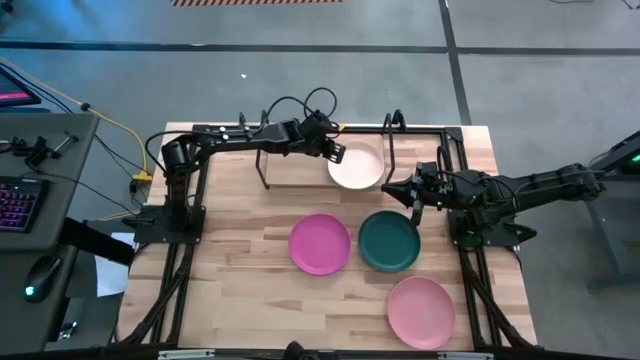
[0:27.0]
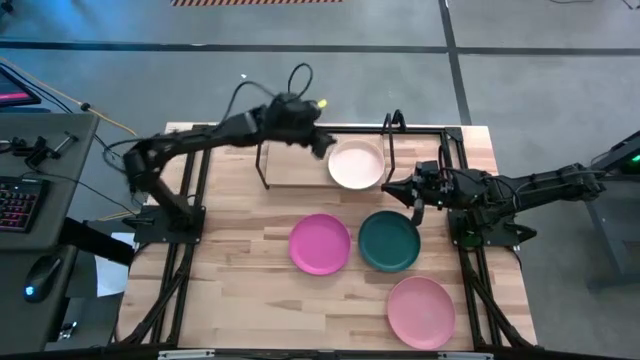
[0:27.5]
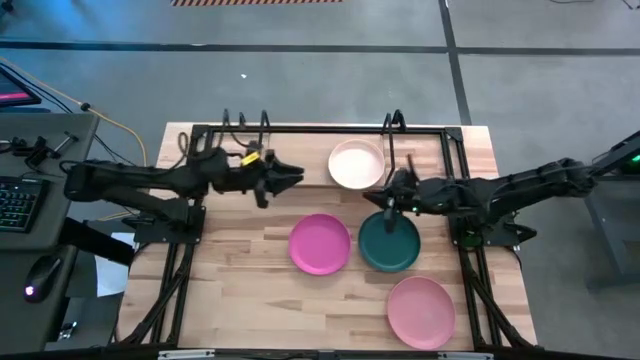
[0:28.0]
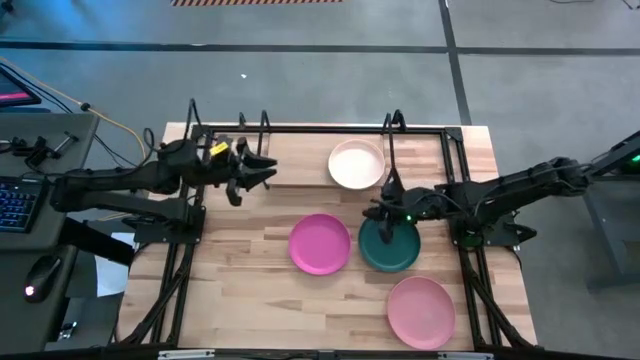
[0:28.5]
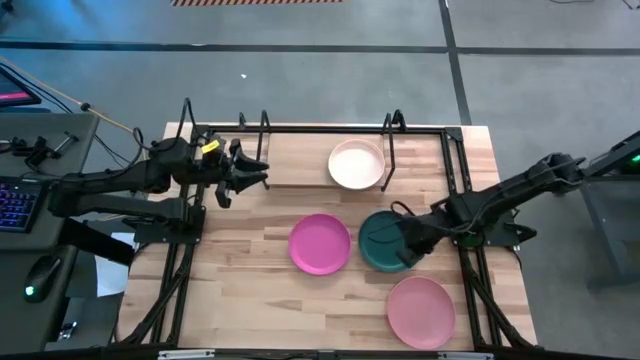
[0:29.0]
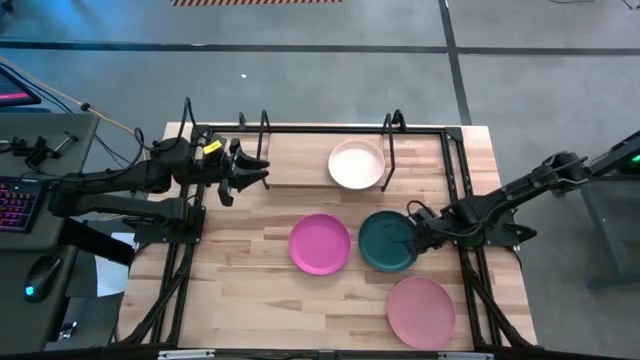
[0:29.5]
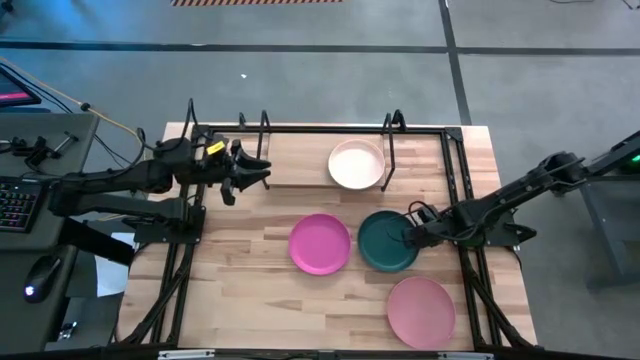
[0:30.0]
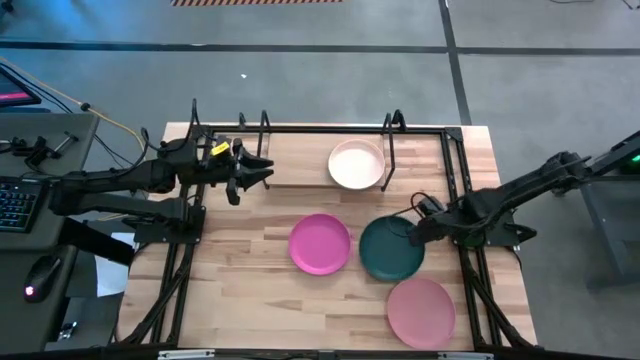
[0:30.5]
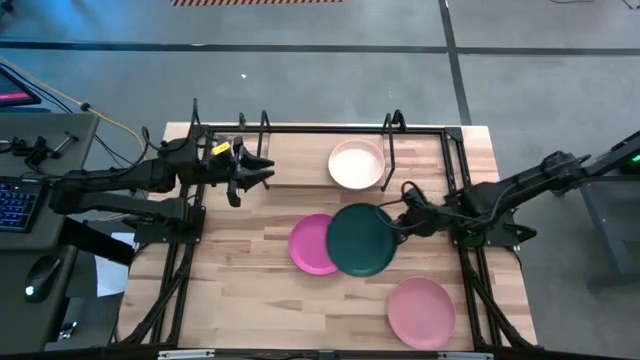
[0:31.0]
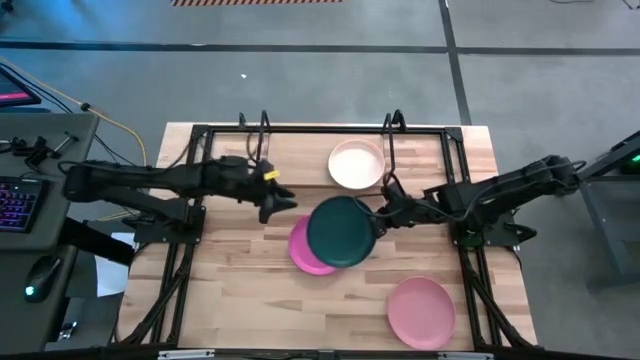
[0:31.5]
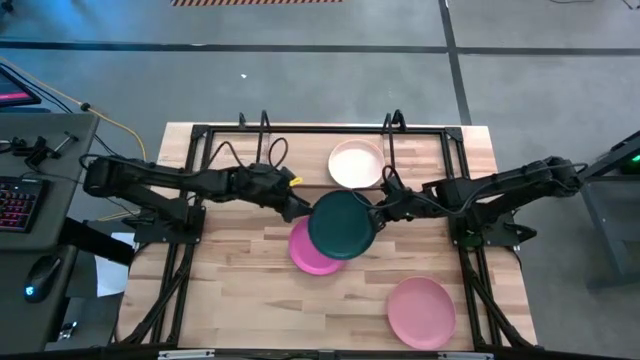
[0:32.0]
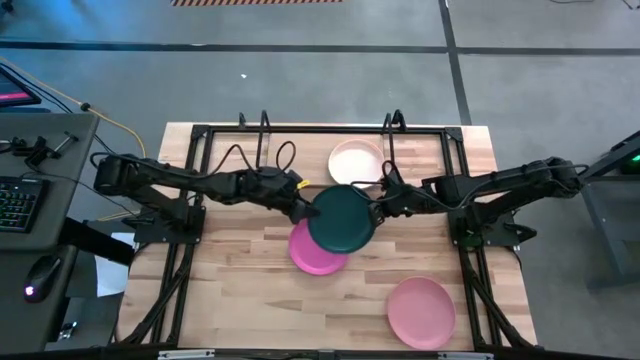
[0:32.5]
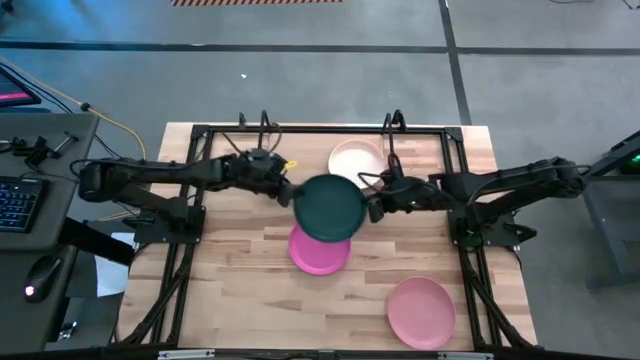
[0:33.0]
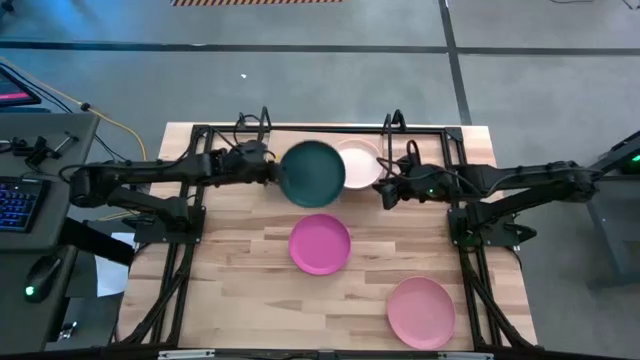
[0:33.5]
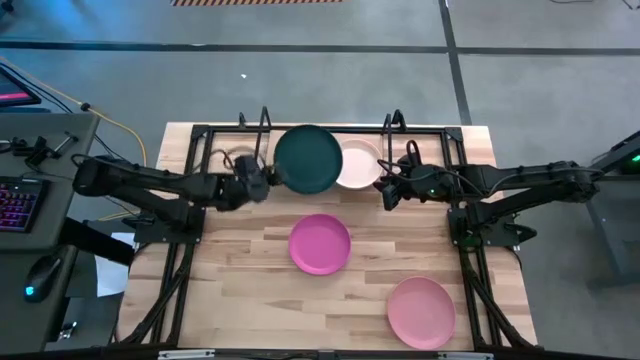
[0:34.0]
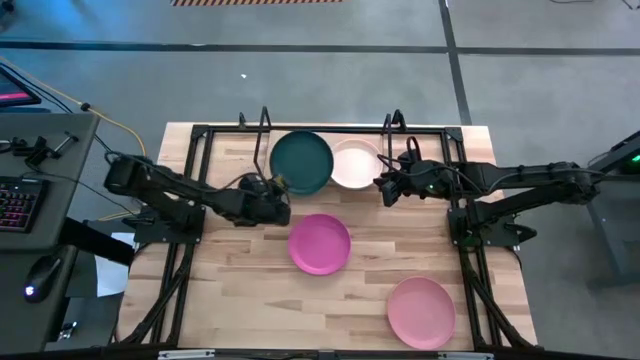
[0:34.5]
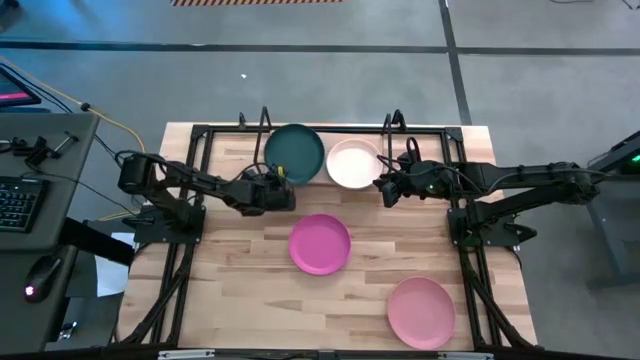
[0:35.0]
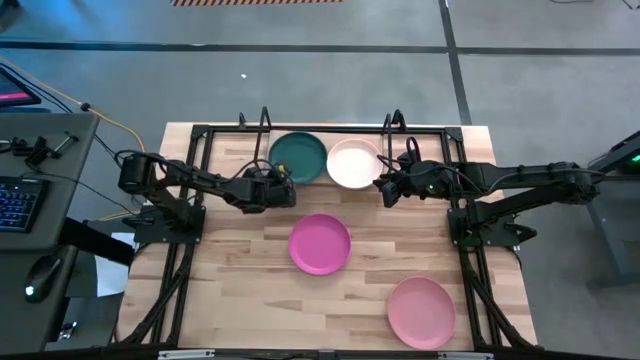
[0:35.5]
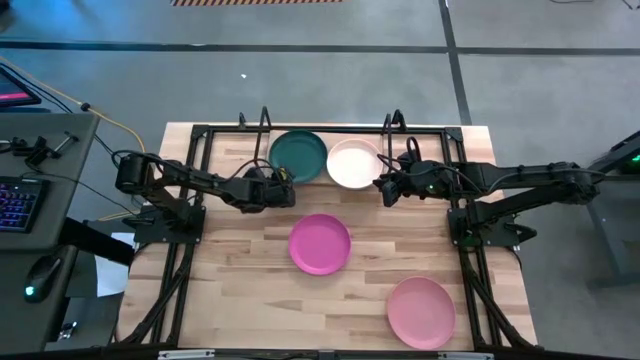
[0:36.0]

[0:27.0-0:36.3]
Task: Place and stack plates onto a shelf
Put the dark green plate on the shelf

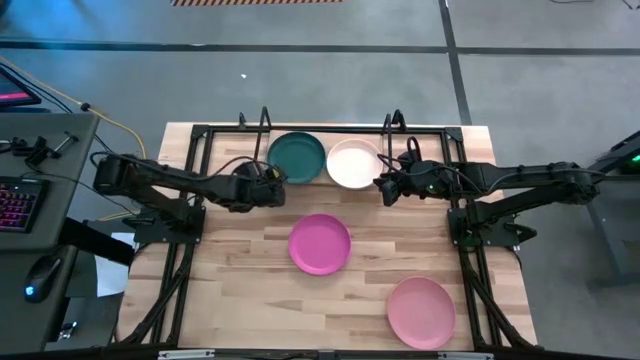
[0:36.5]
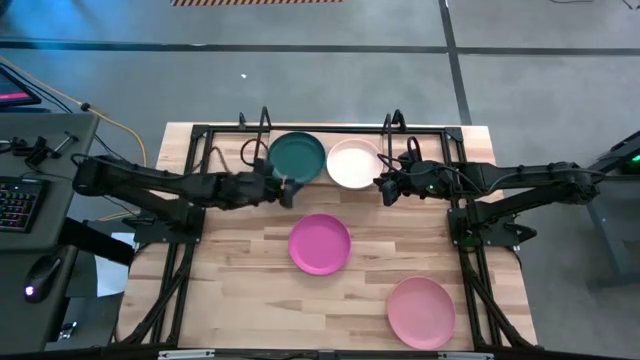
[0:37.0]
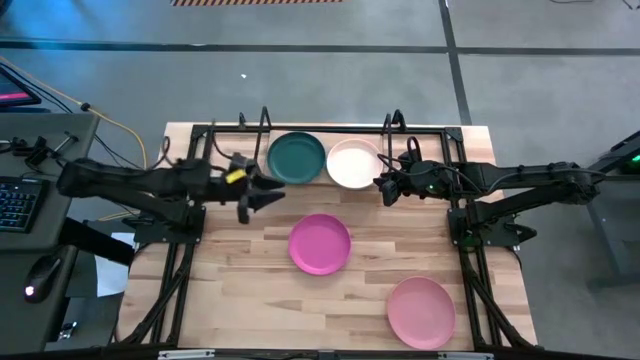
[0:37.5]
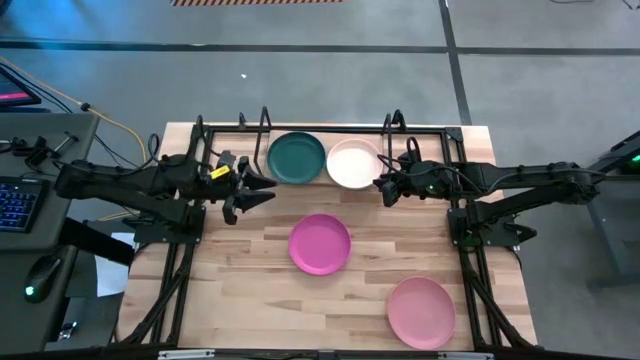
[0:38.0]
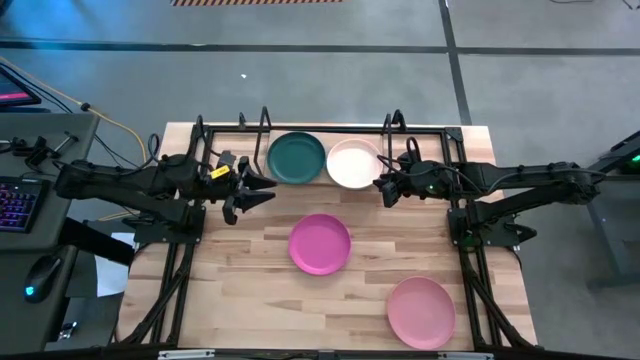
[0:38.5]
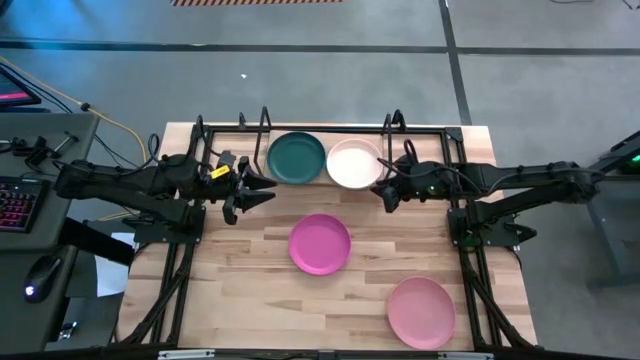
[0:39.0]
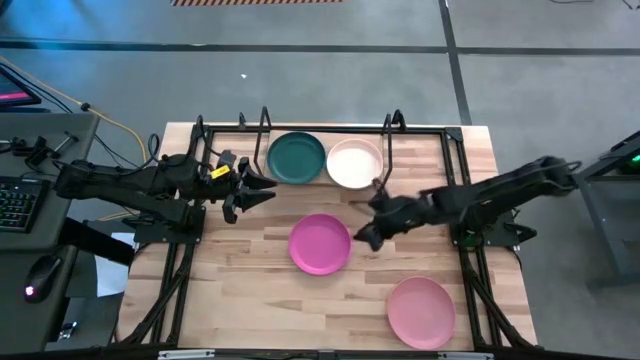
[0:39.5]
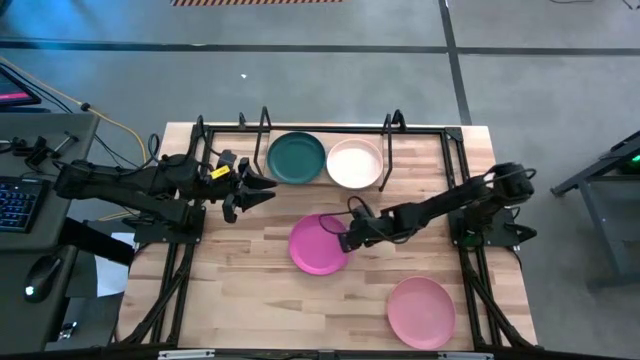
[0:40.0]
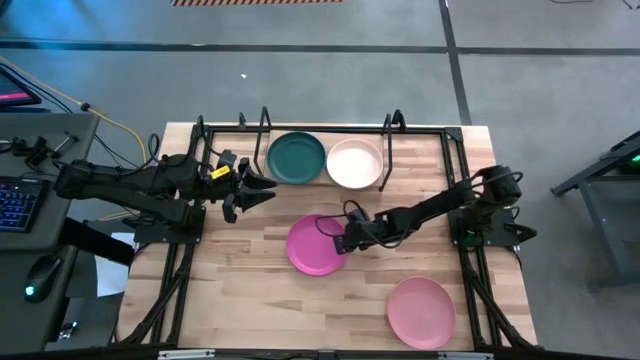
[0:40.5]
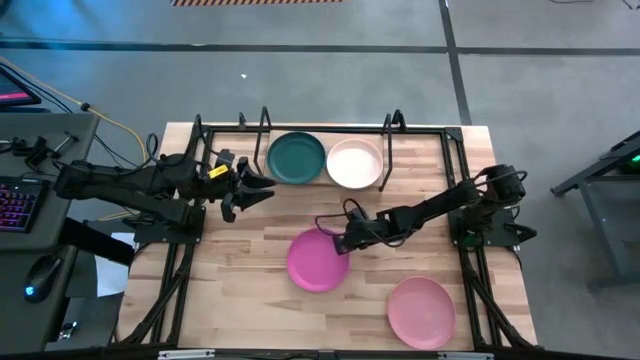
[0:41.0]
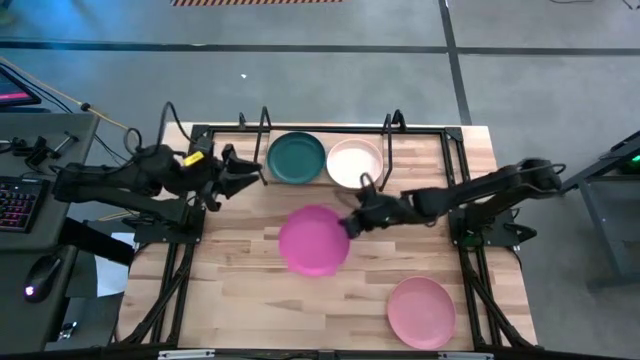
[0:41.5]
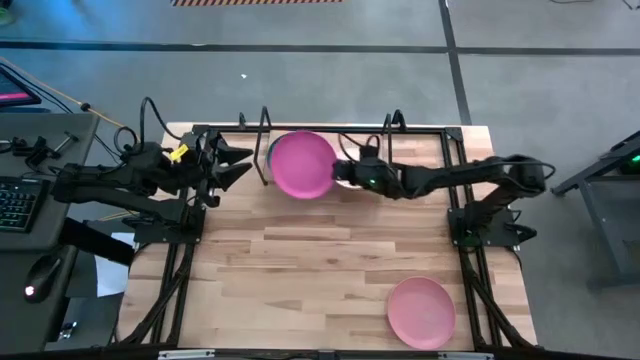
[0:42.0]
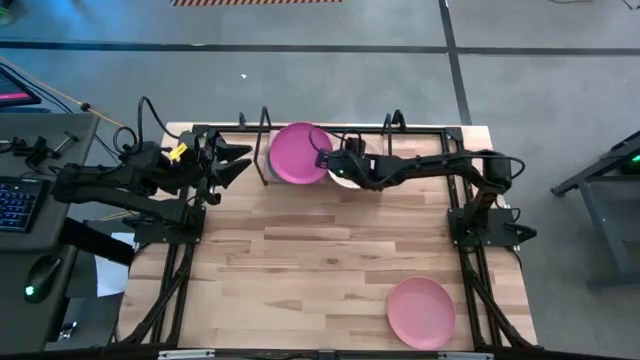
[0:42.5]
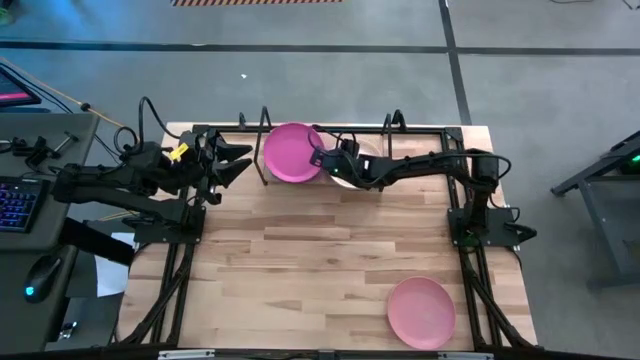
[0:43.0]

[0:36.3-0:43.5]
Stack the pink plate on top of the dark green plate on the shelf

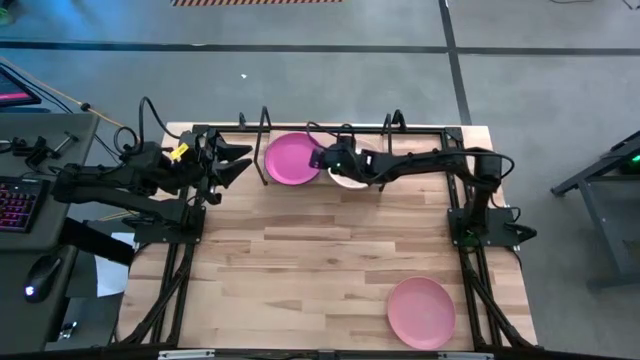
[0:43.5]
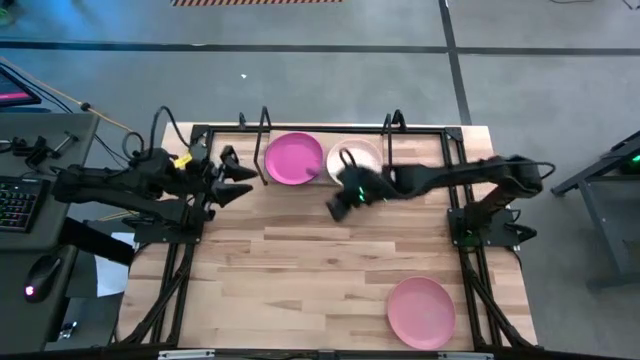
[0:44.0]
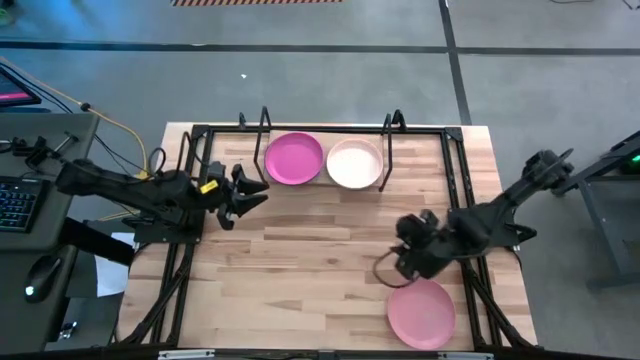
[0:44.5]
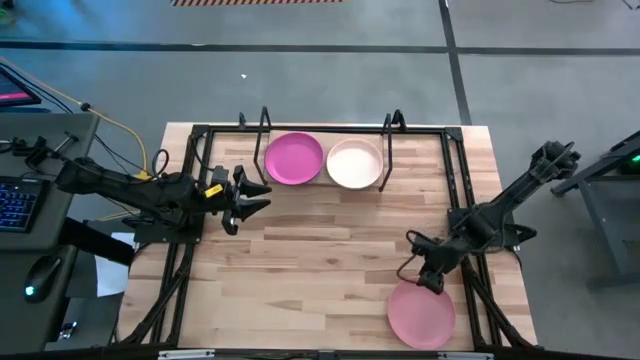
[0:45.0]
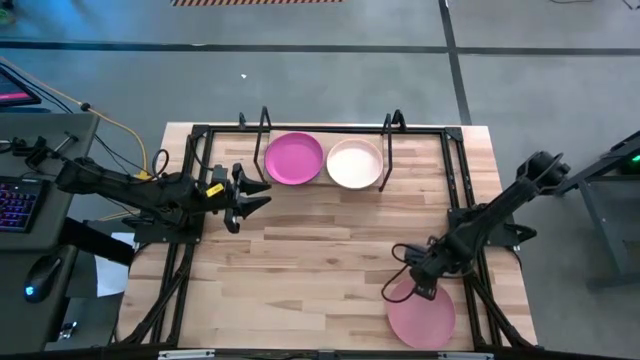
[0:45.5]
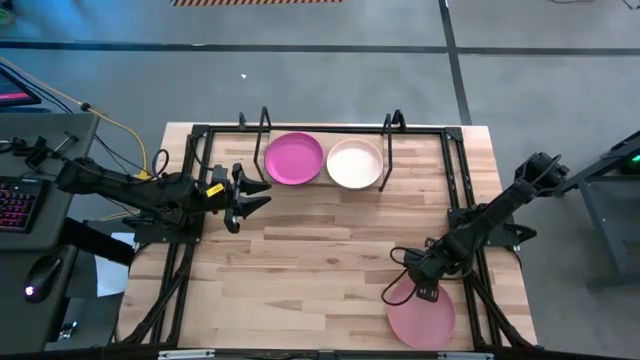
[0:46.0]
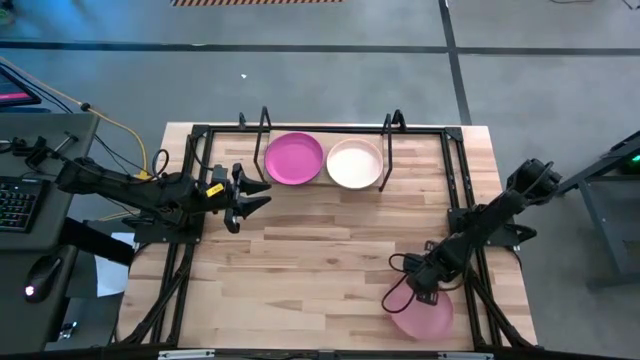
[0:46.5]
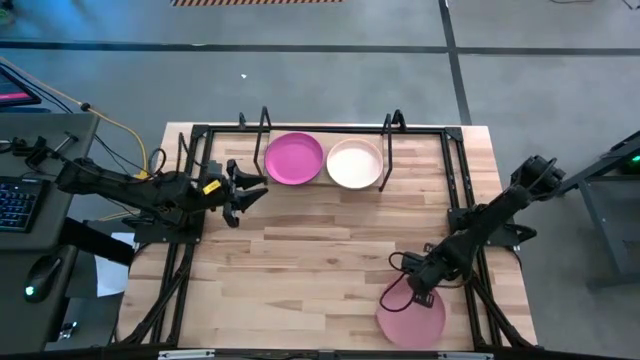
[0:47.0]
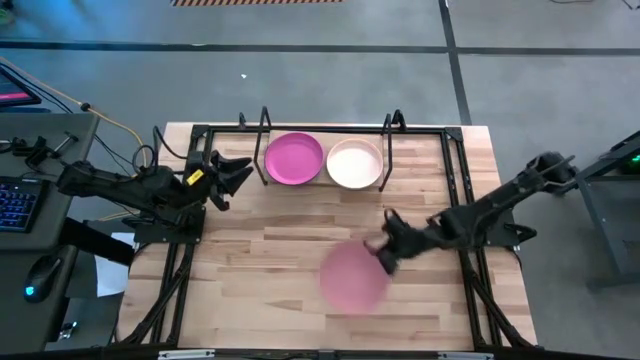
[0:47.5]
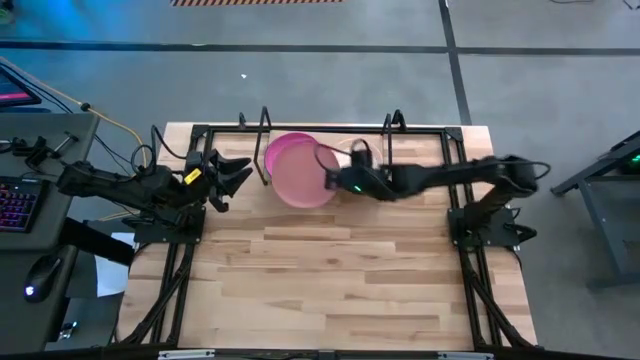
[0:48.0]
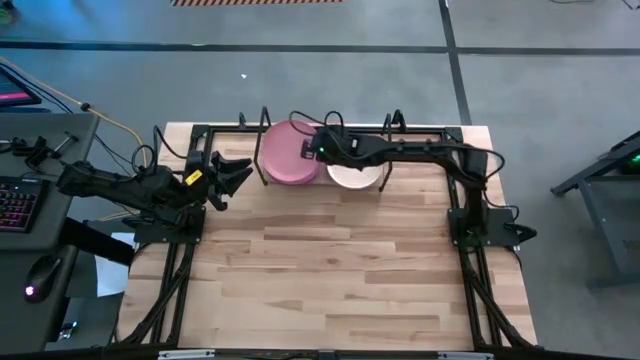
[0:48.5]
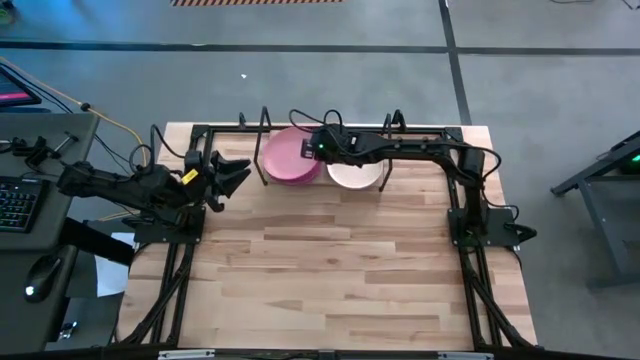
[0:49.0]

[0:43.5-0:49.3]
Stack the light pink plate on top of the pink plate on the shelf
